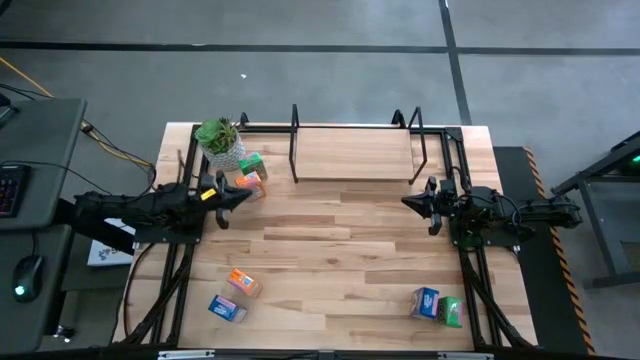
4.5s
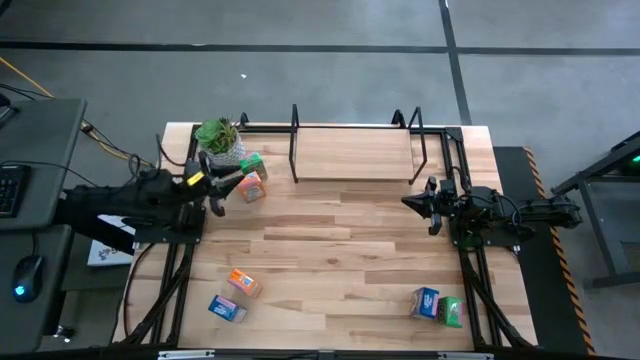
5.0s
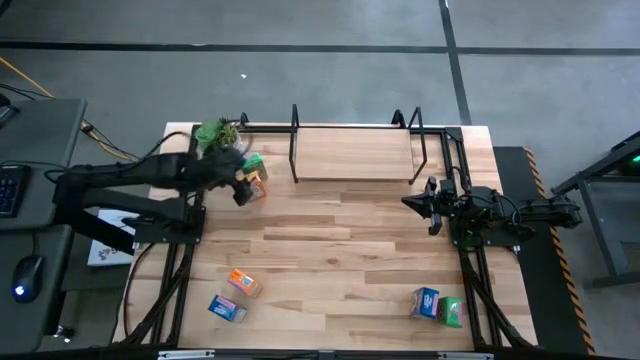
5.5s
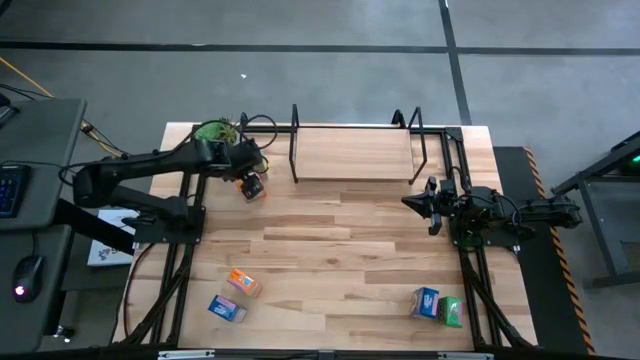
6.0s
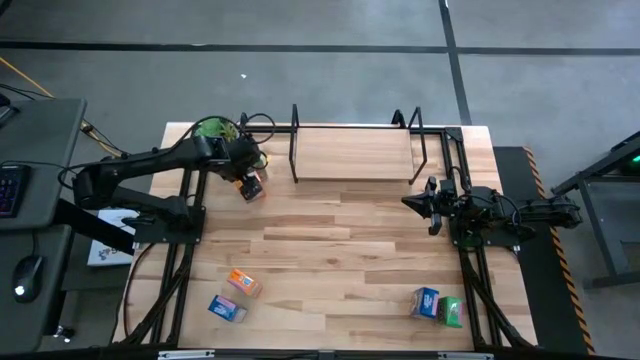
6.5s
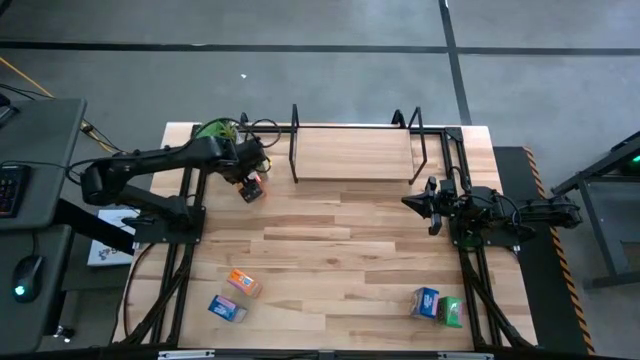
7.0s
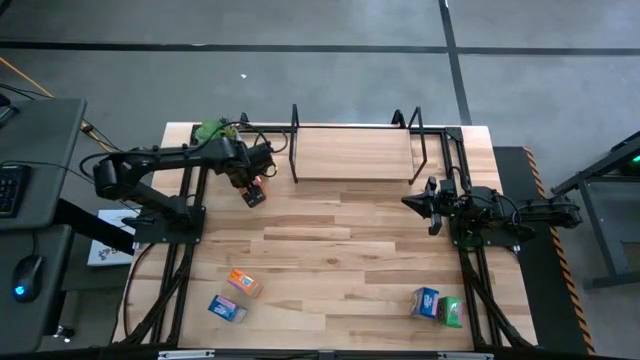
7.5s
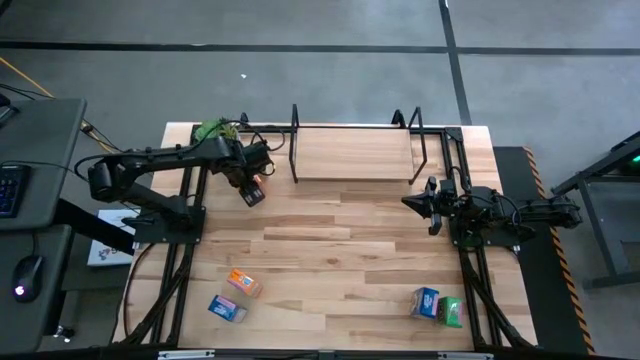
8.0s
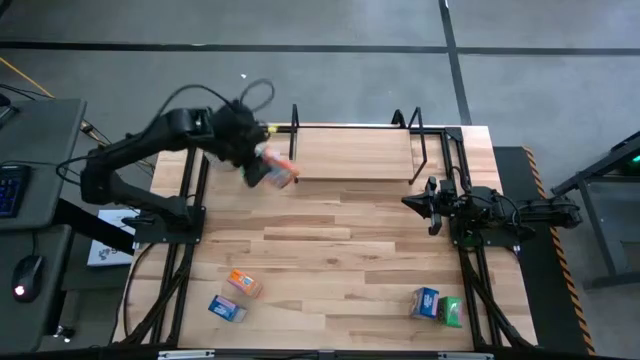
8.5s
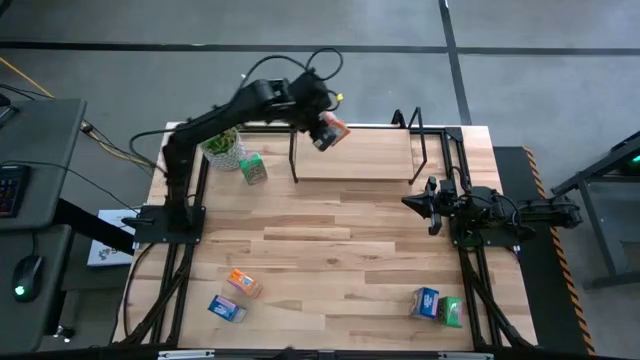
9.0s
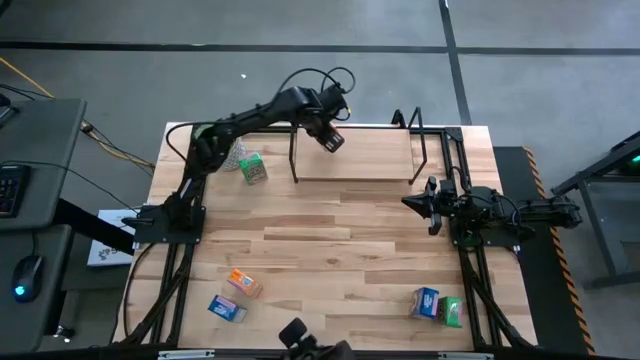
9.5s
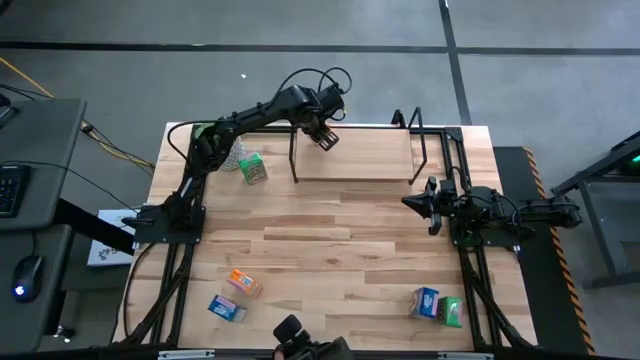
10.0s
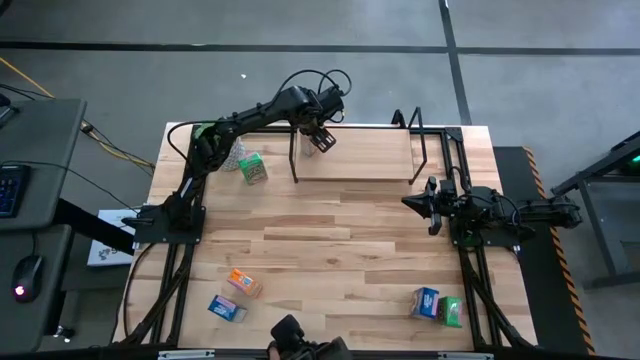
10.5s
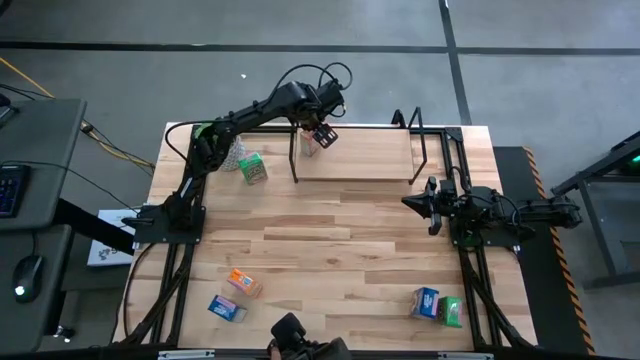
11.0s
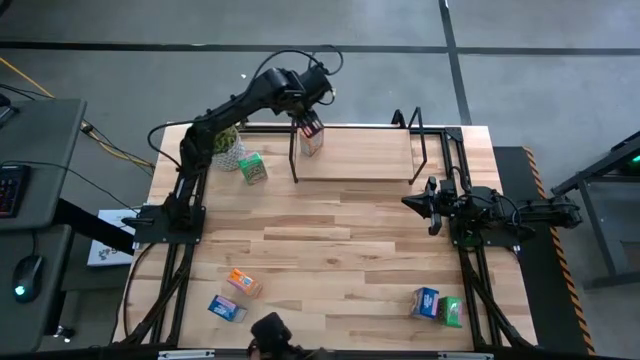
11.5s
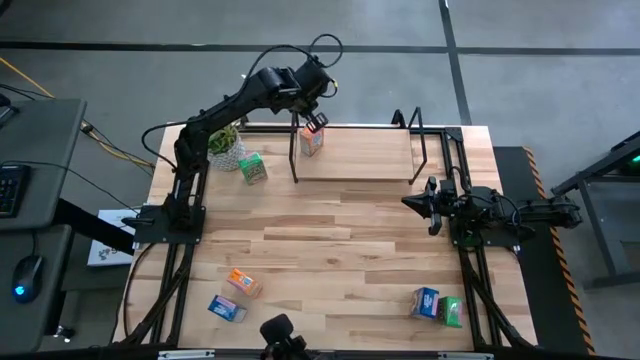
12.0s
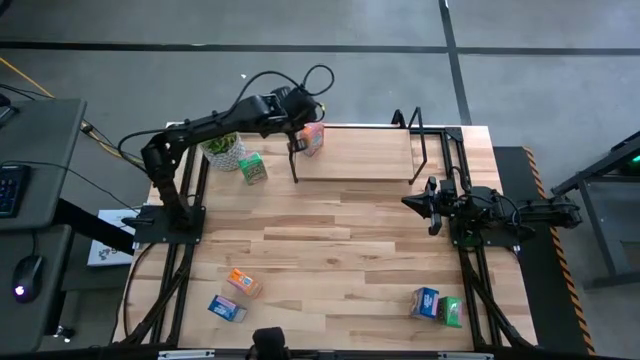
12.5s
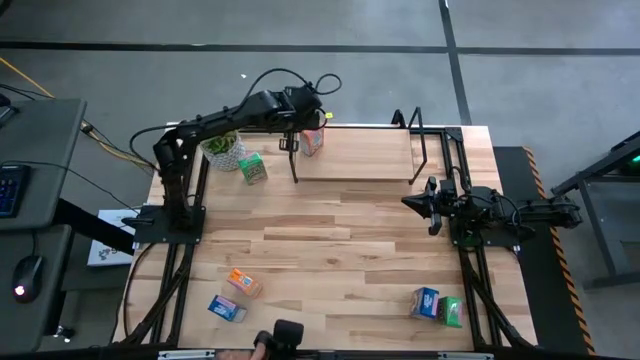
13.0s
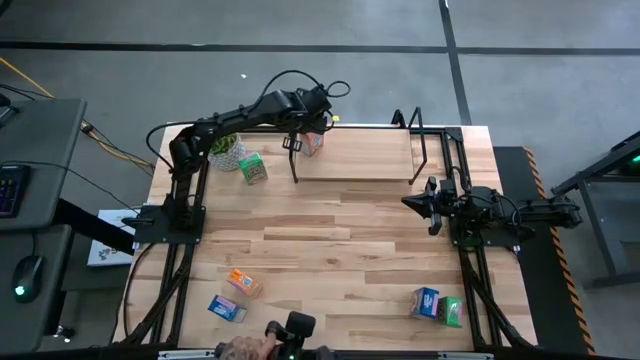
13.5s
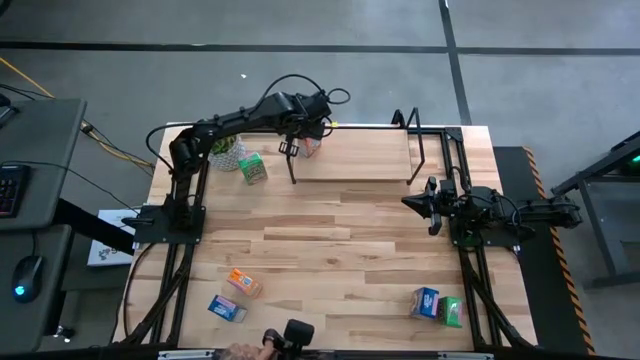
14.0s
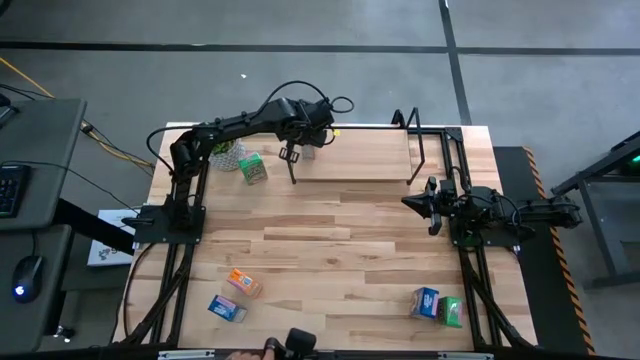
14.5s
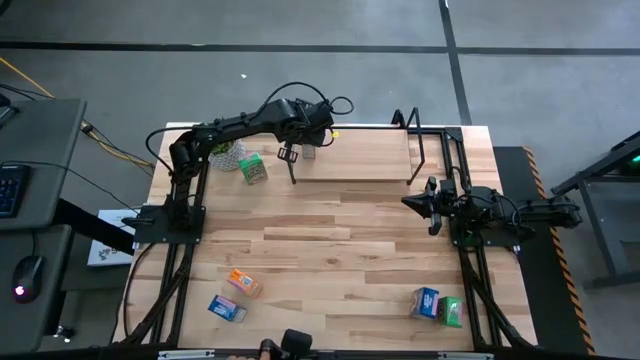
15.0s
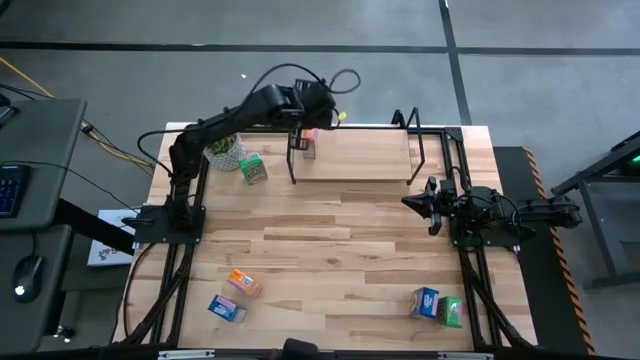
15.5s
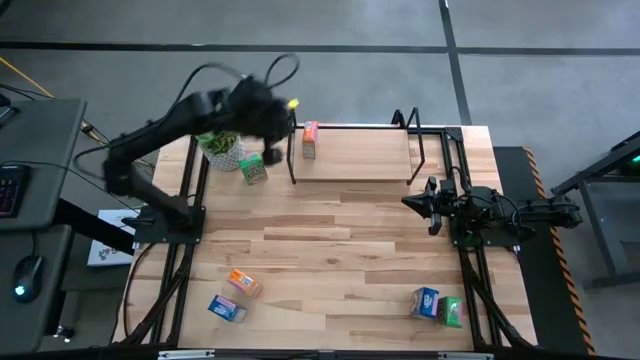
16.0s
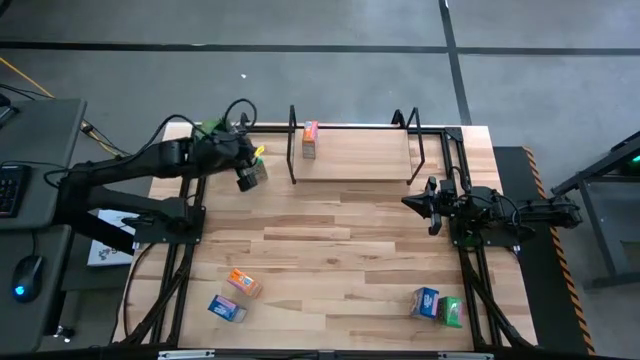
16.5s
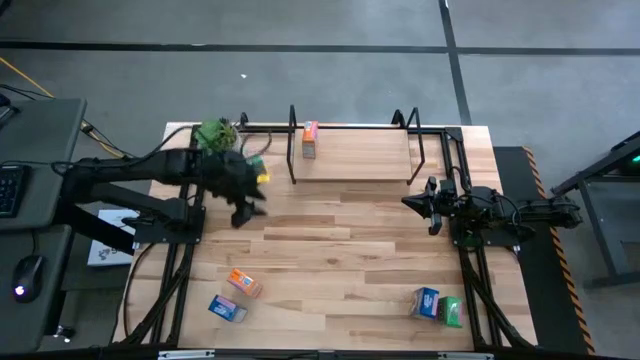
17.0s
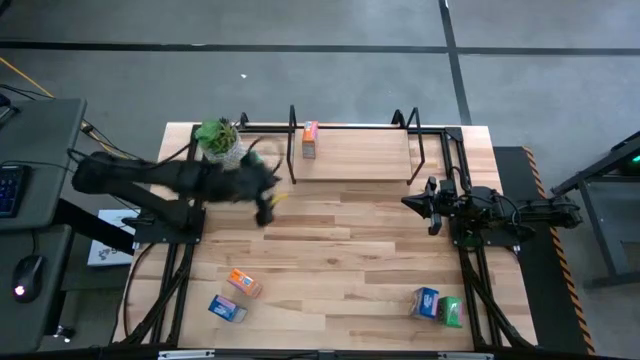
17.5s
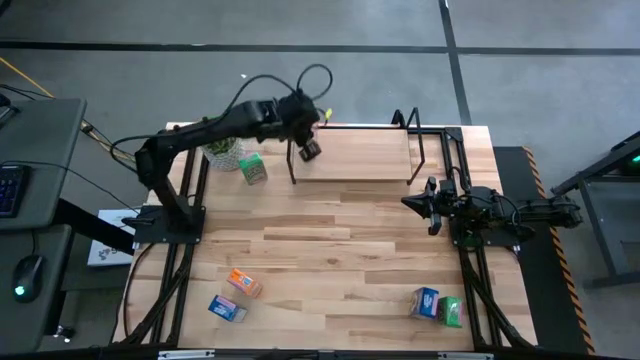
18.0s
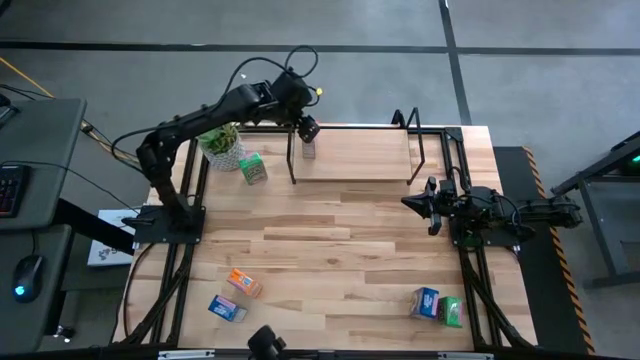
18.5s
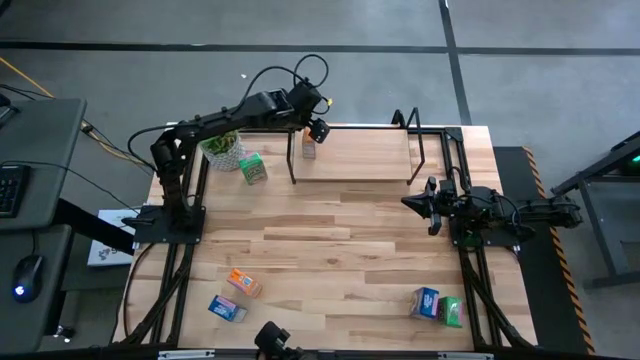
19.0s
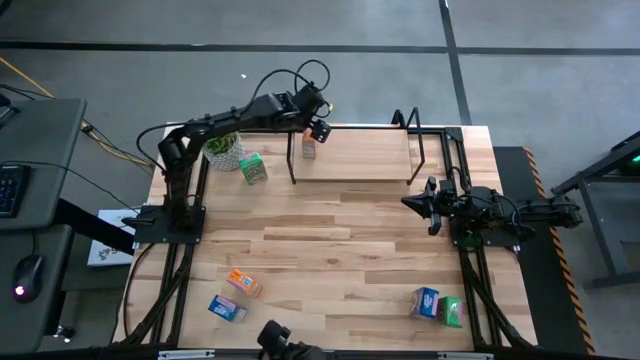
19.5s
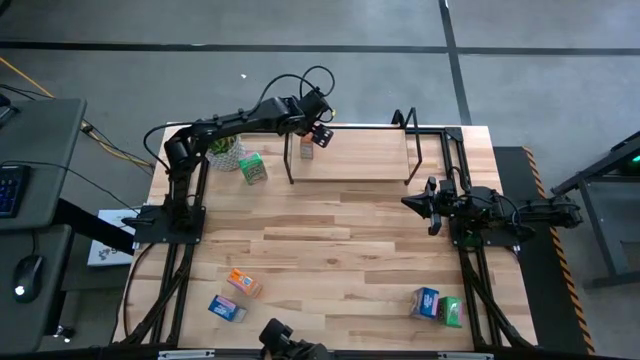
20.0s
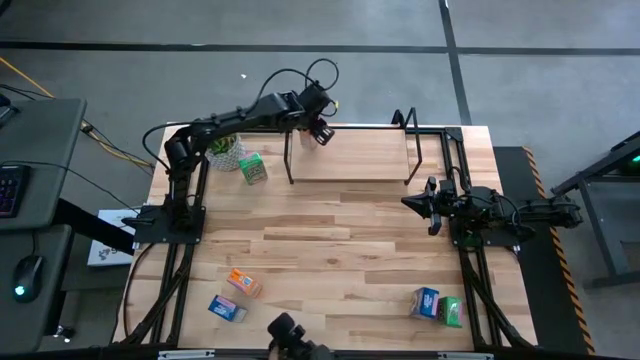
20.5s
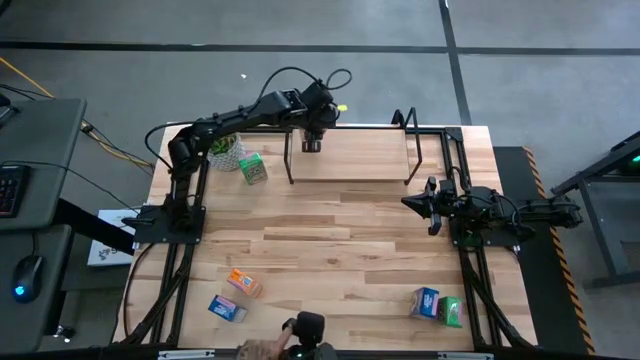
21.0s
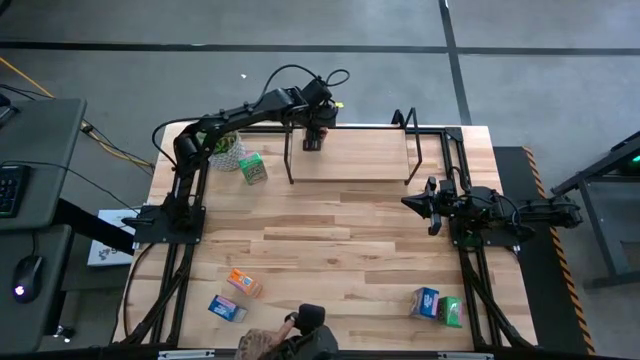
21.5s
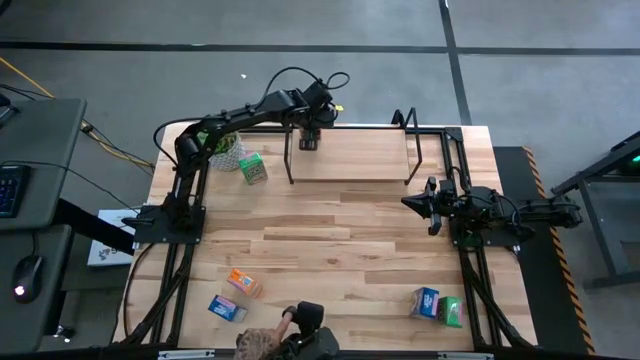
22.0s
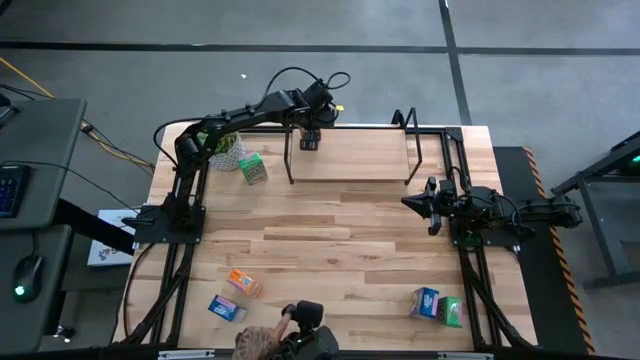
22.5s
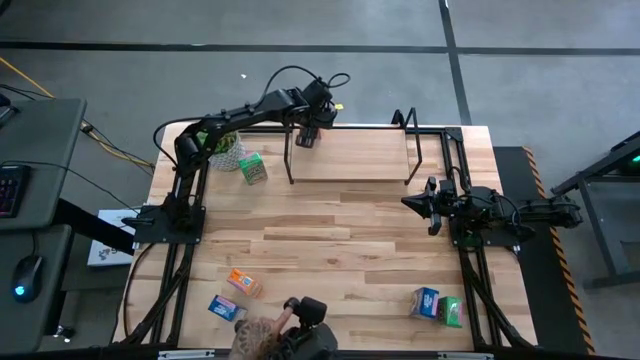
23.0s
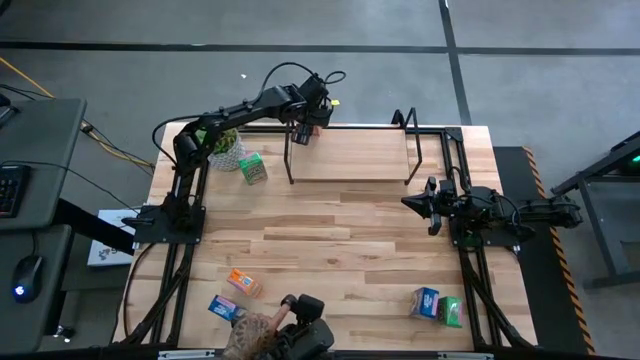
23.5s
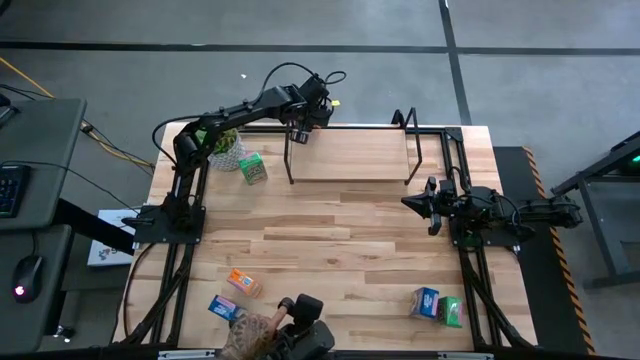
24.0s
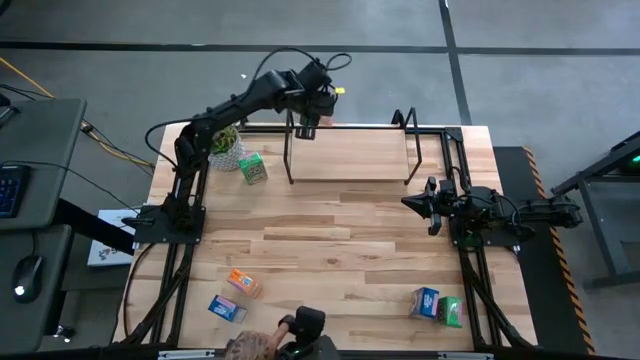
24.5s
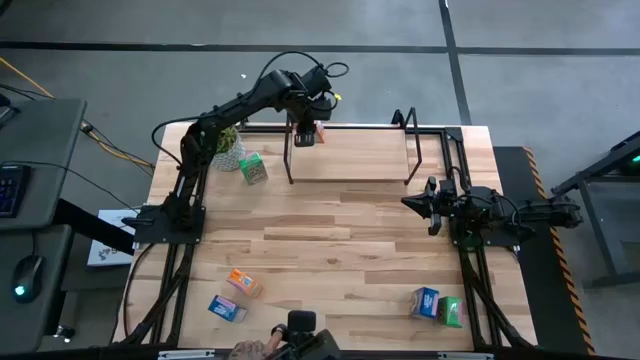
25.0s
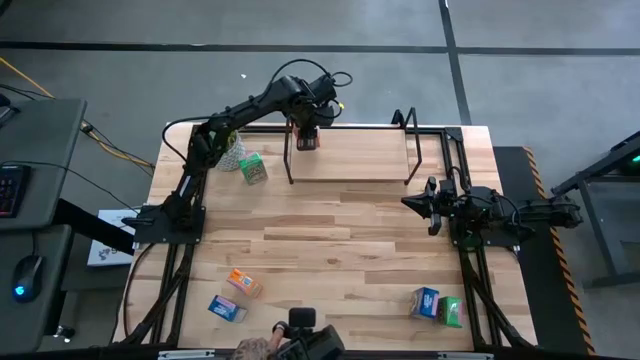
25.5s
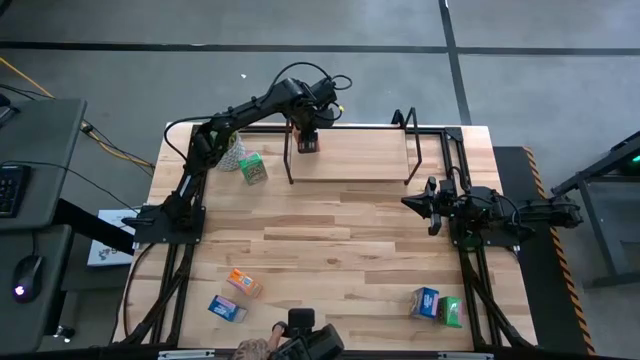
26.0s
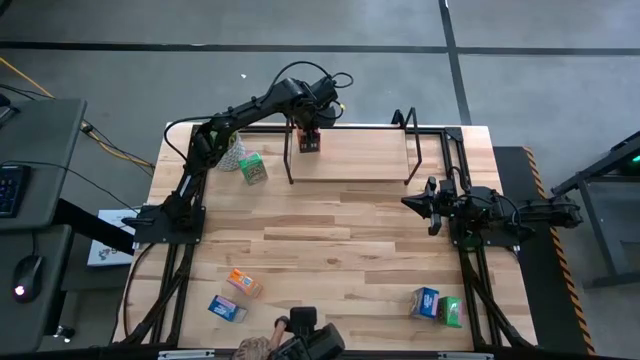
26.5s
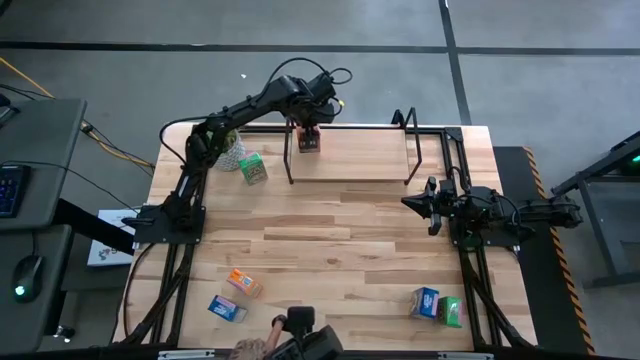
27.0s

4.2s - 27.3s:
Task: Stack cereal on shelf
Put the top orange cereal box on the shelf
